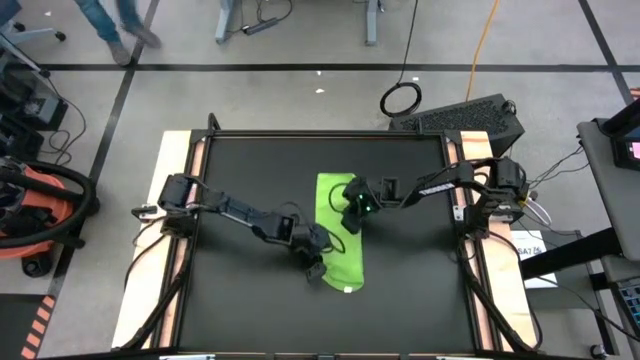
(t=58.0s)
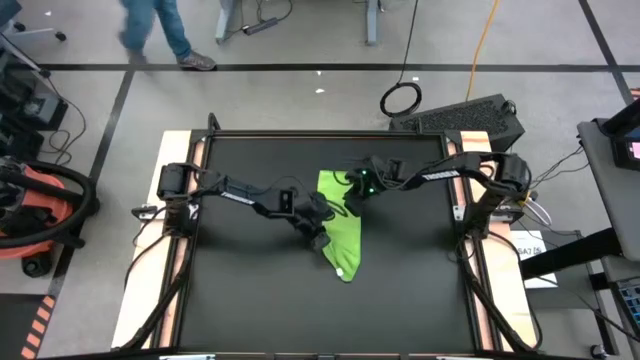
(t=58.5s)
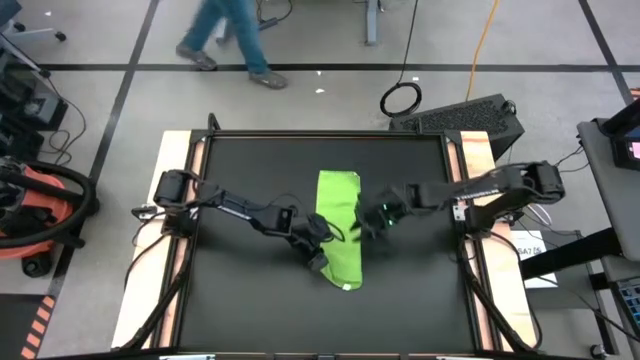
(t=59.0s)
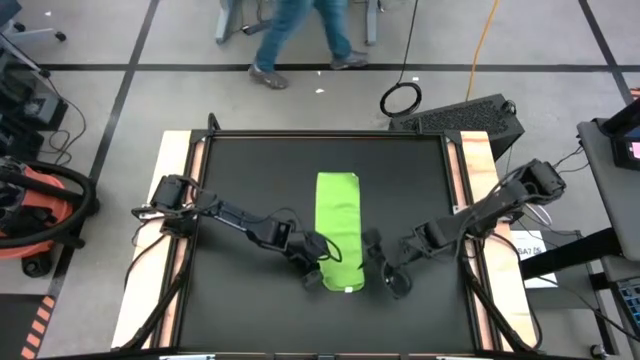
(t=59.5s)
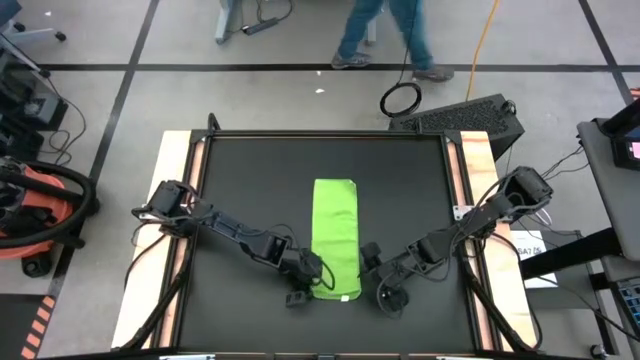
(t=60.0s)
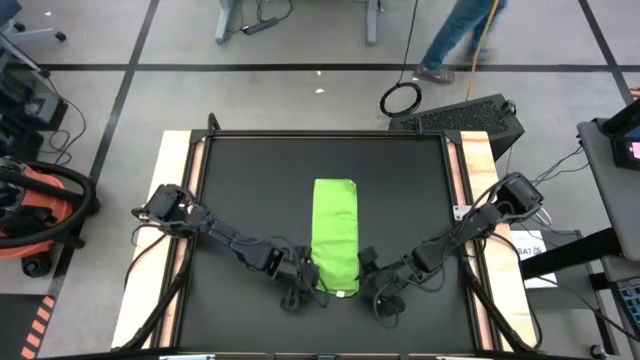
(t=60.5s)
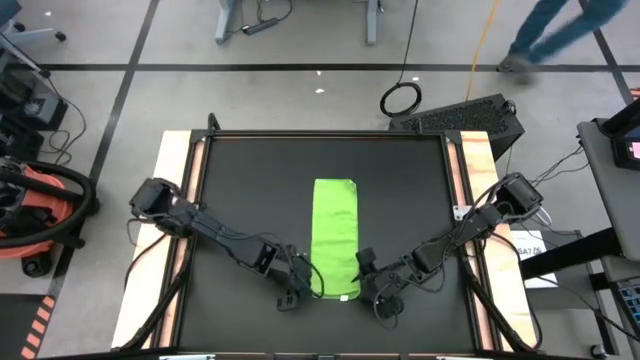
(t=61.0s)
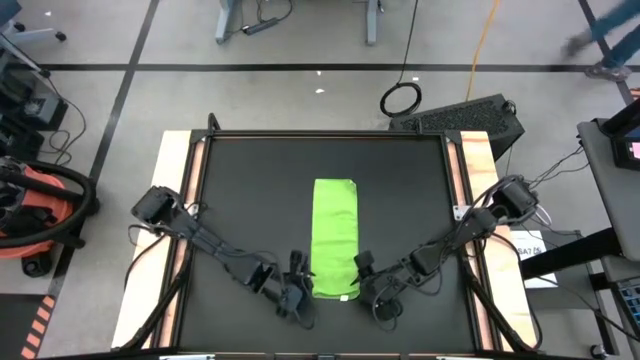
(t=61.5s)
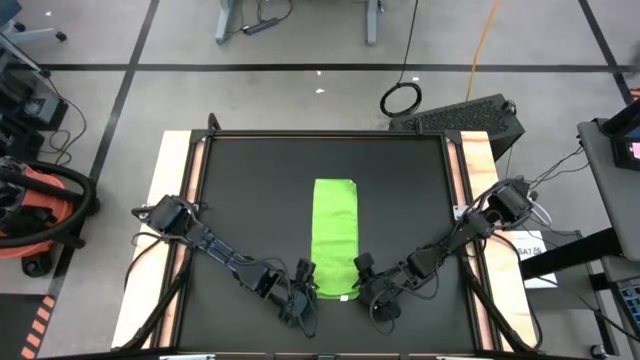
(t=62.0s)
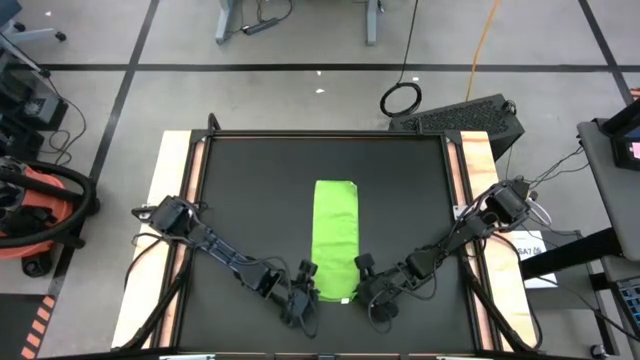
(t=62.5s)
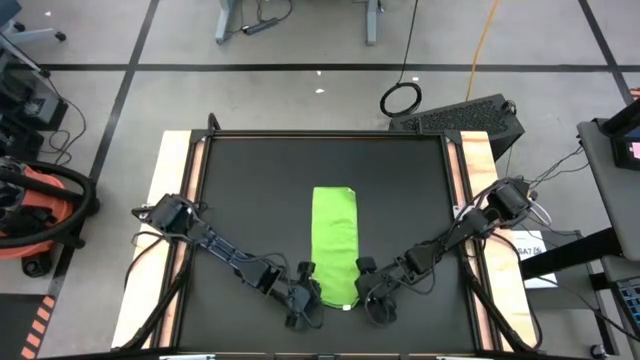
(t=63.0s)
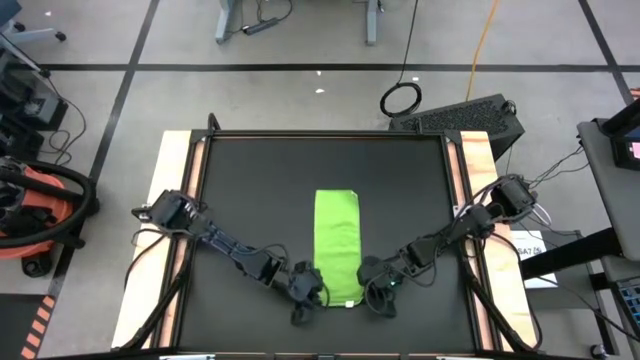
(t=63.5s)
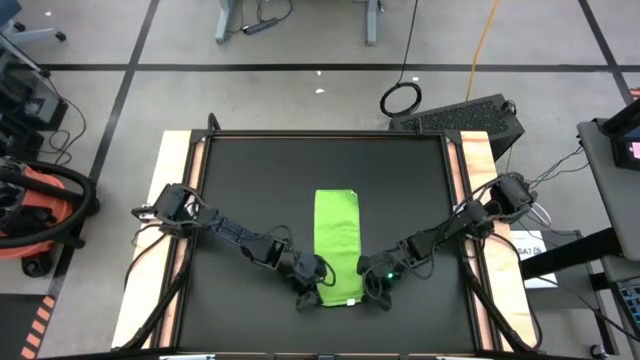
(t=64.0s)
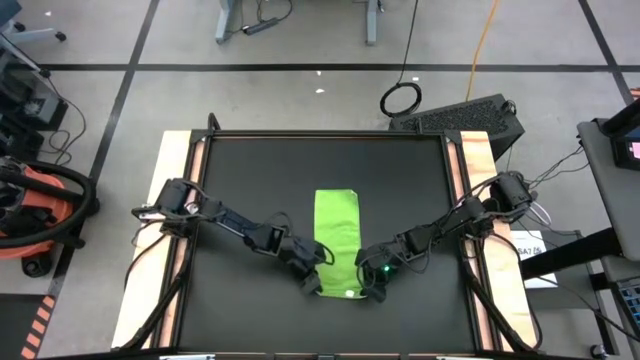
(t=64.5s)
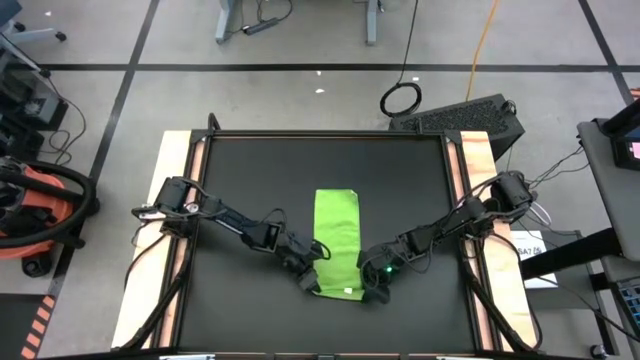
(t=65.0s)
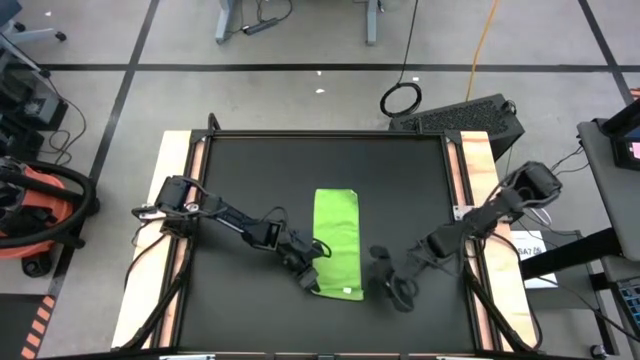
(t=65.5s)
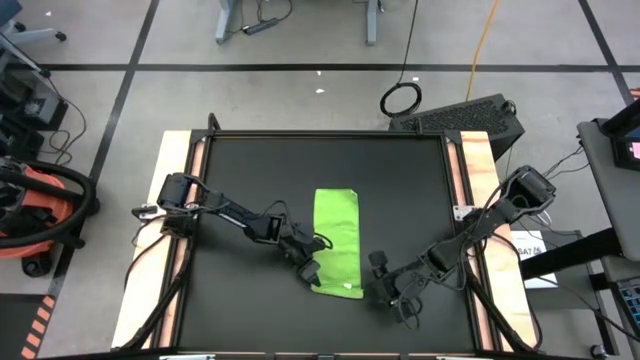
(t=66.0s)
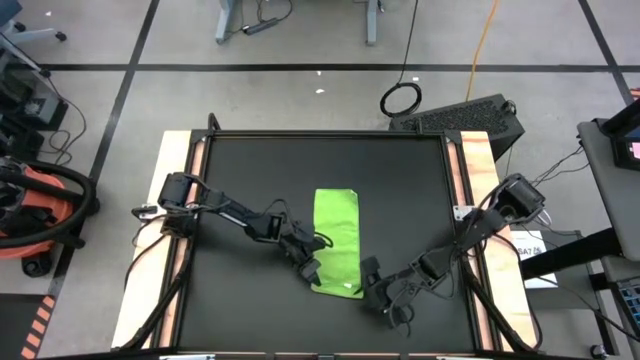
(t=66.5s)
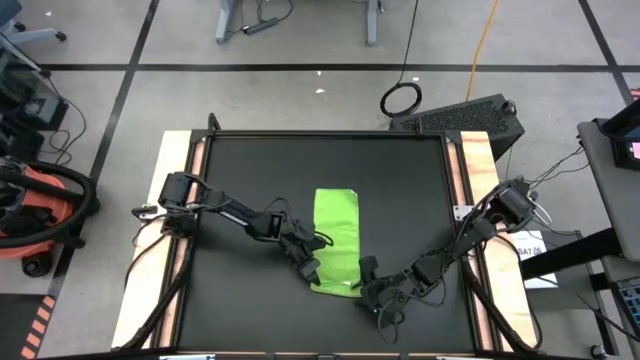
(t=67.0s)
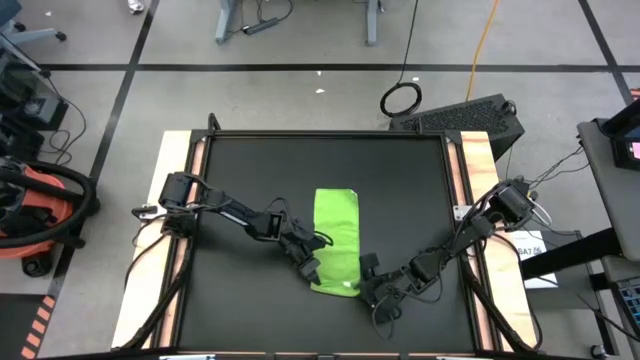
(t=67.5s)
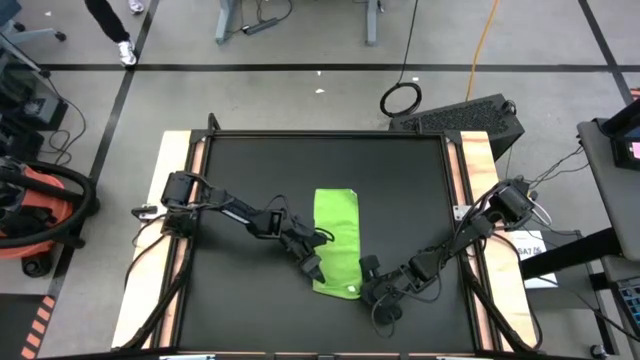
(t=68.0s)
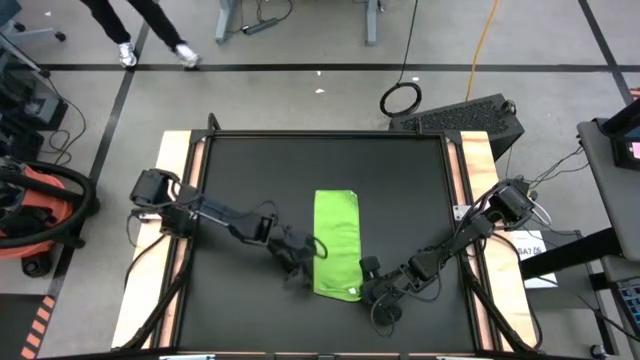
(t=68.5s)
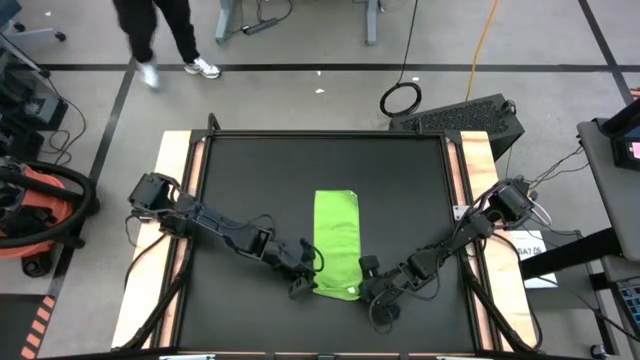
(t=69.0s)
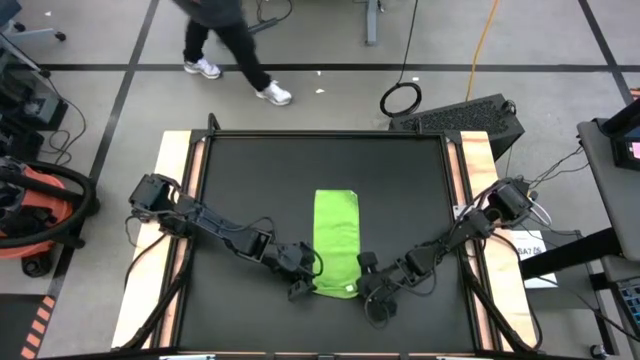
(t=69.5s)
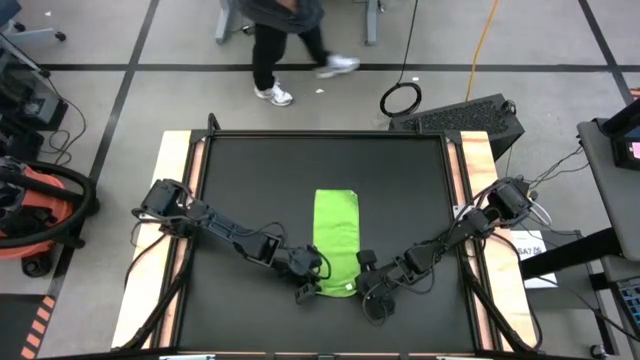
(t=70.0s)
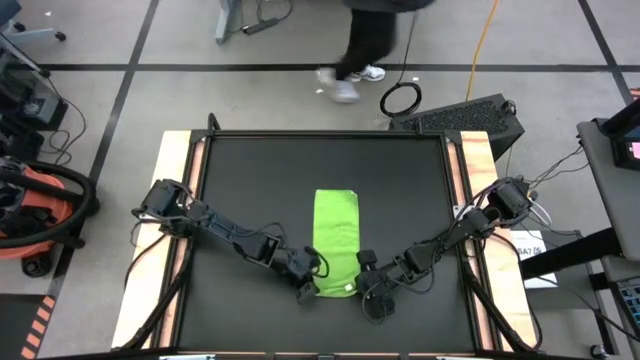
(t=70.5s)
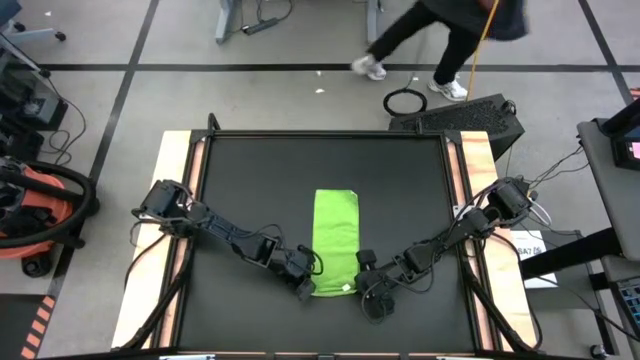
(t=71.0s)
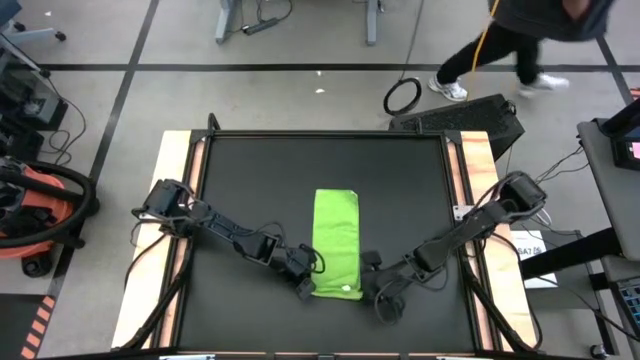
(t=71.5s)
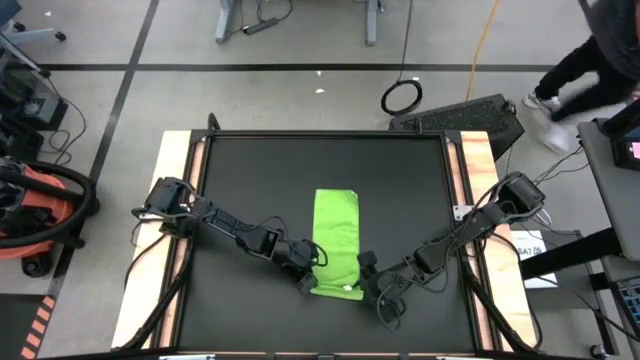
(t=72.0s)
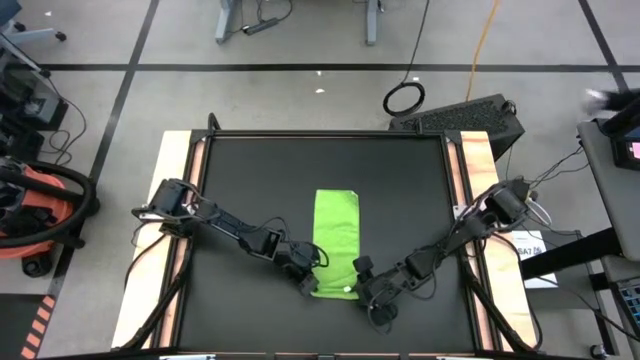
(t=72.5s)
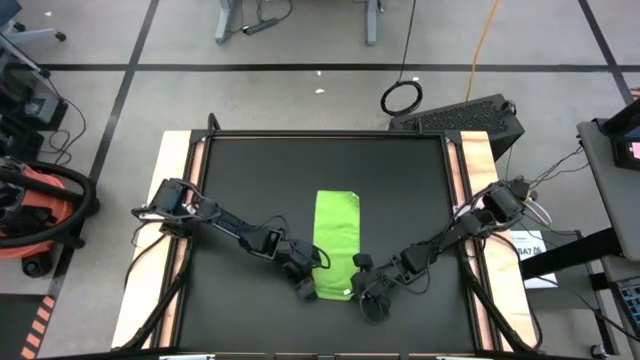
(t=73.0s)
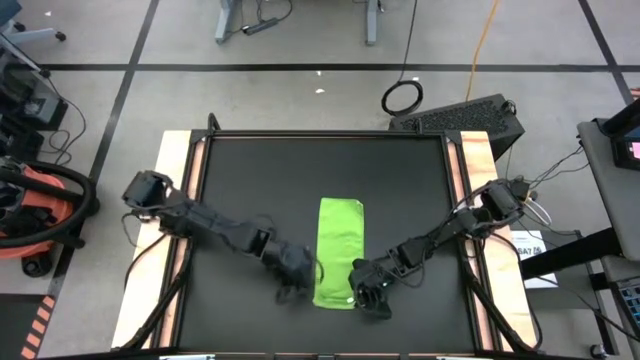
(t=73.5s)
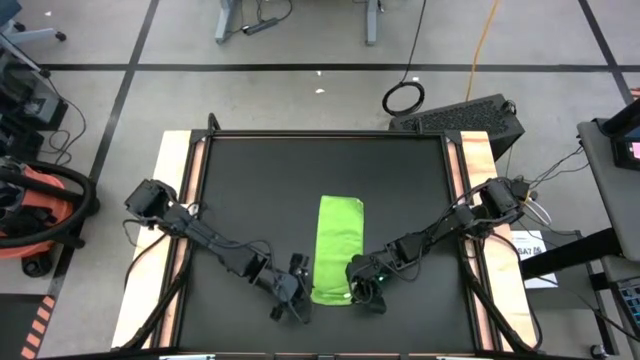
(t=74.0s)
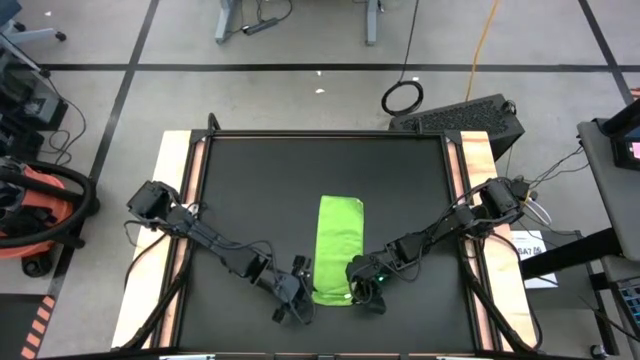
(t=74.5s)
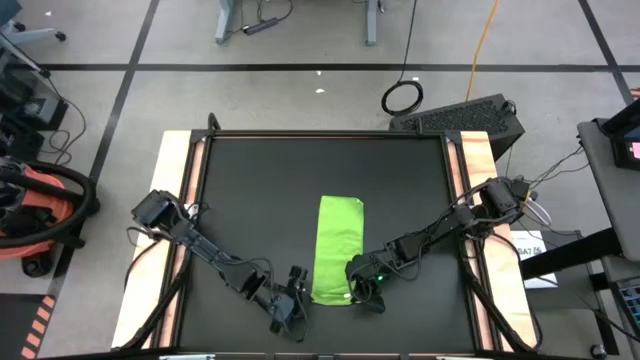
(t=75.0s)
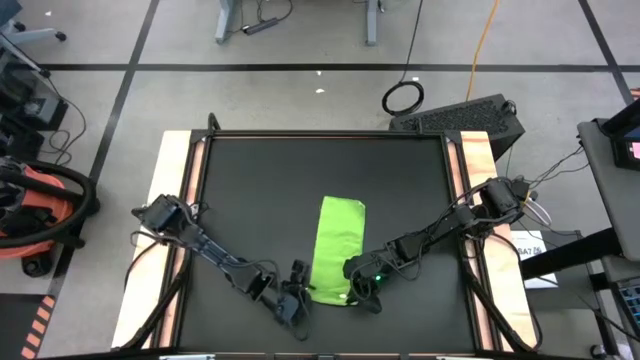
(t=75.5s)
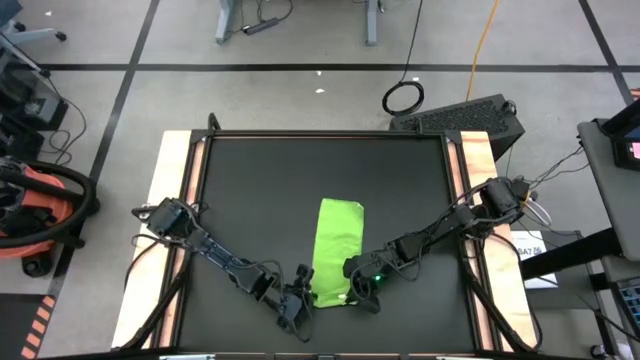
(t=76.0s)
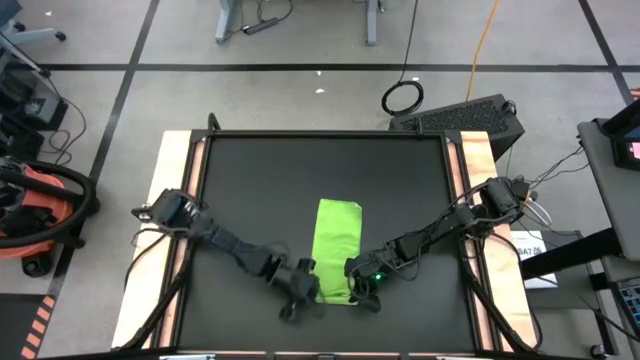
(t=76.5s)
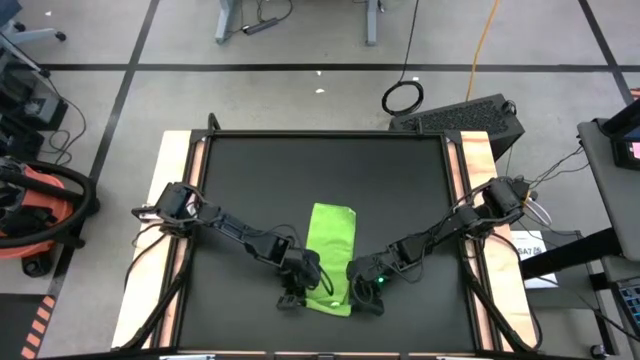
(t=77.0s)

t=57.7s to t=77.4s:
Task: Roll towel
Roll the green microfiber towel

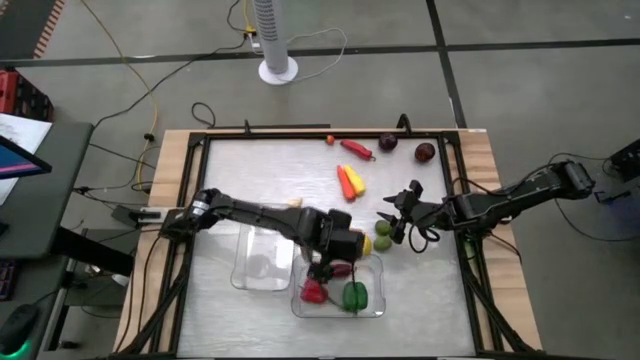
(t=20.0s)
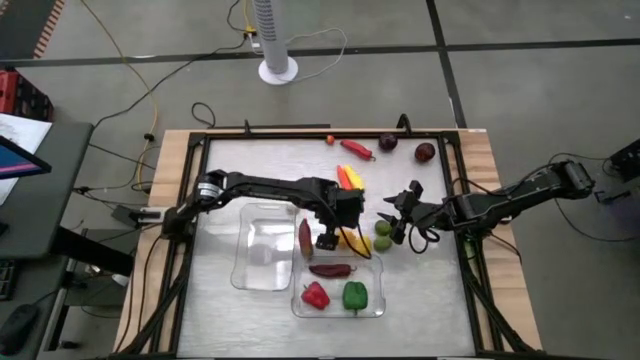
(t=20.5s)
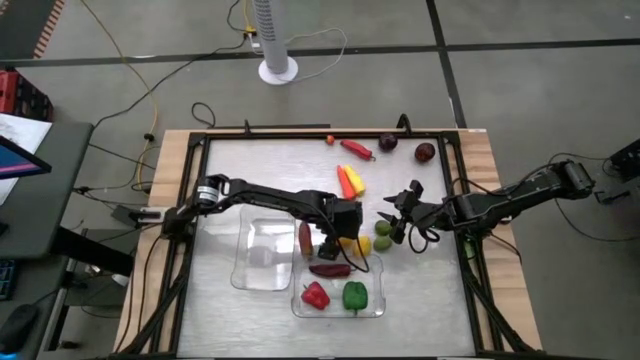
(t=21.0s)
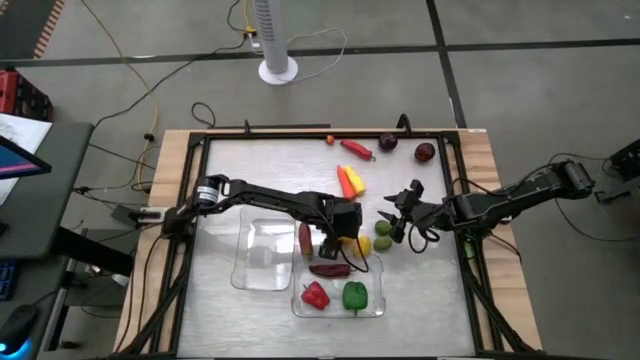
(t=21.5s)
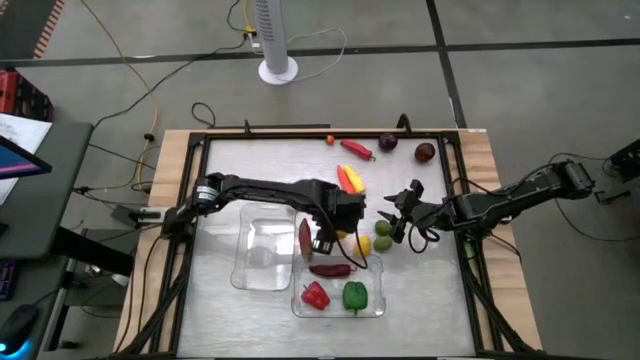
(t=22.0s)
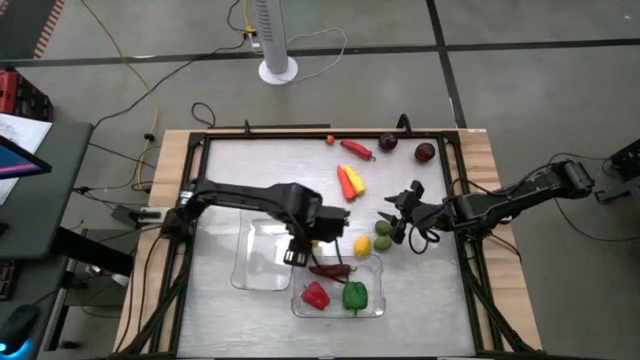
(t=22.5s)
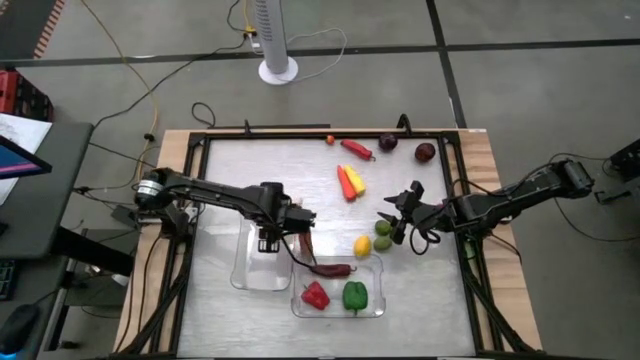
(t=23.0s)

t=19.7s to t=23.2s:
Task: Sort produce into baskets
Put the left yellow lemon into the left transparent bin
